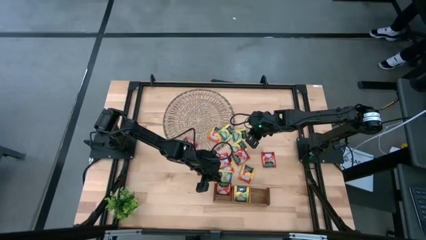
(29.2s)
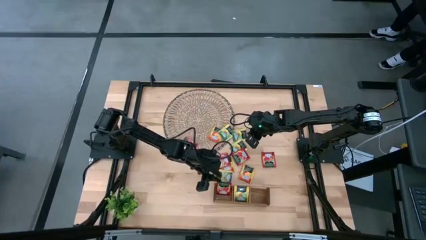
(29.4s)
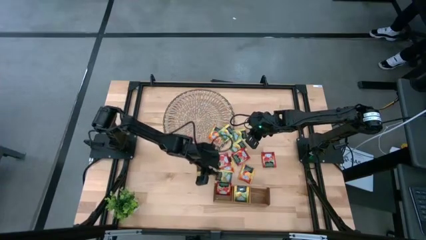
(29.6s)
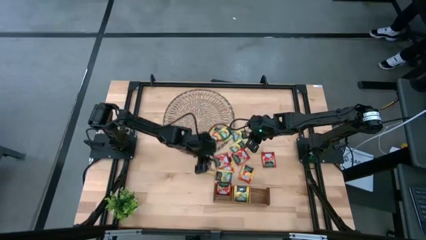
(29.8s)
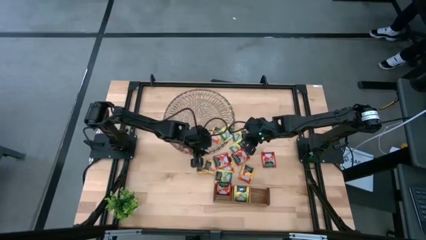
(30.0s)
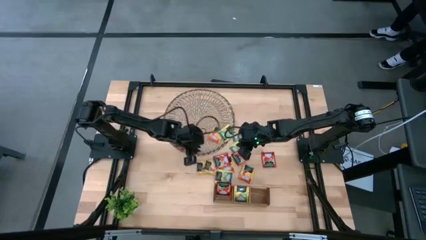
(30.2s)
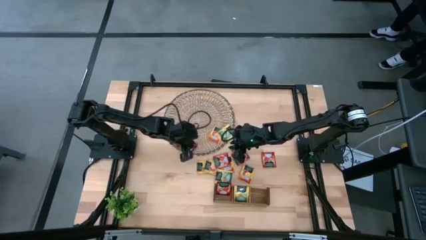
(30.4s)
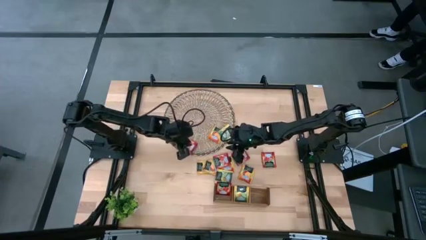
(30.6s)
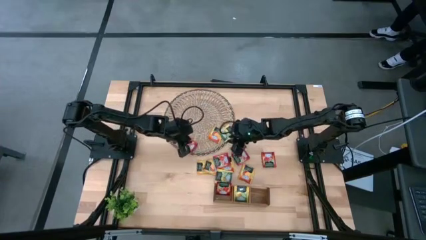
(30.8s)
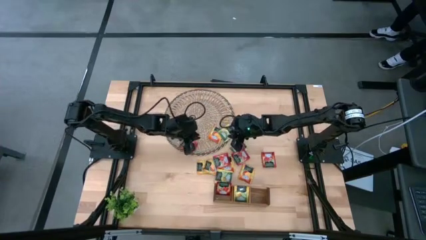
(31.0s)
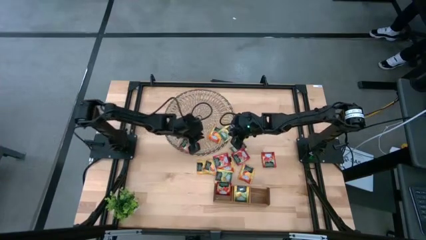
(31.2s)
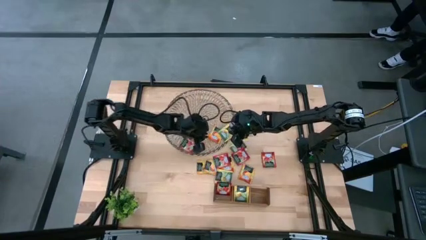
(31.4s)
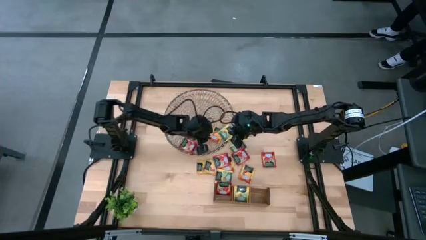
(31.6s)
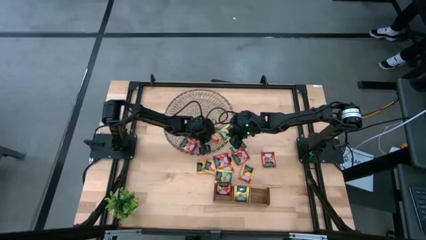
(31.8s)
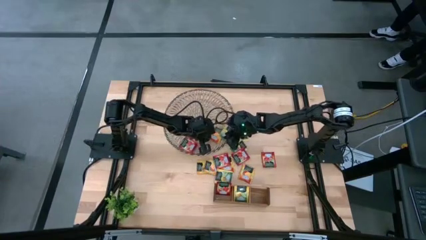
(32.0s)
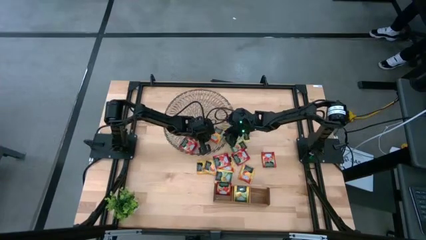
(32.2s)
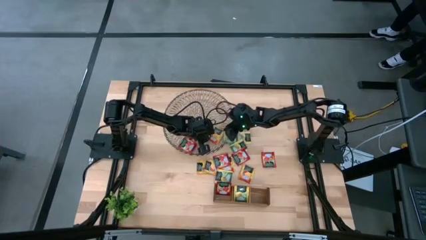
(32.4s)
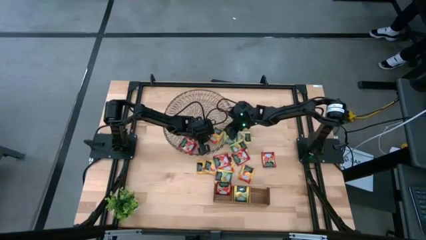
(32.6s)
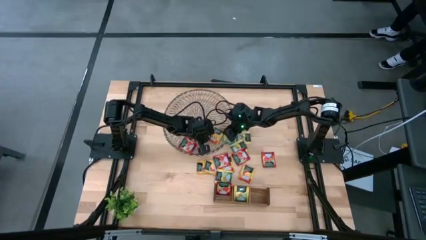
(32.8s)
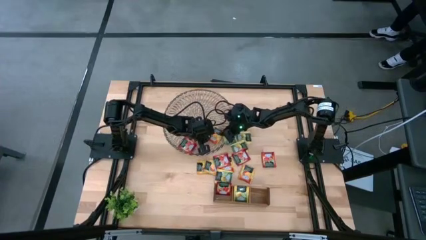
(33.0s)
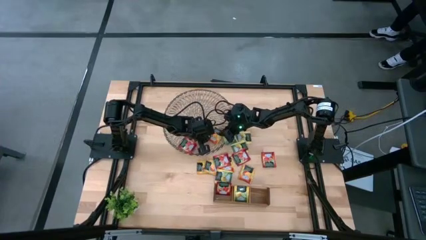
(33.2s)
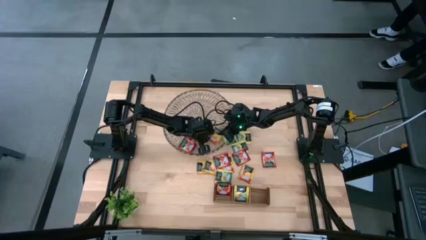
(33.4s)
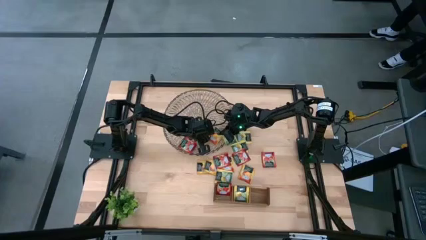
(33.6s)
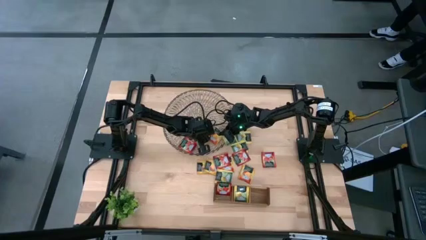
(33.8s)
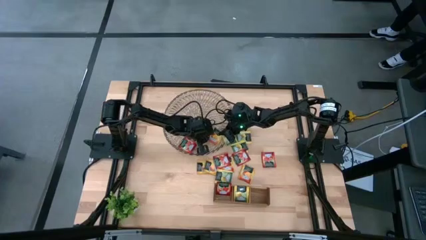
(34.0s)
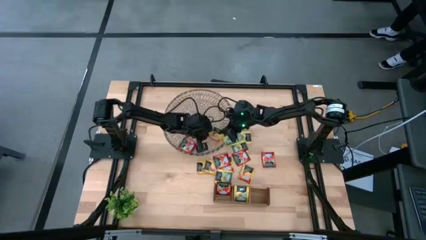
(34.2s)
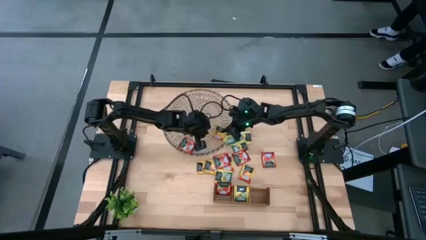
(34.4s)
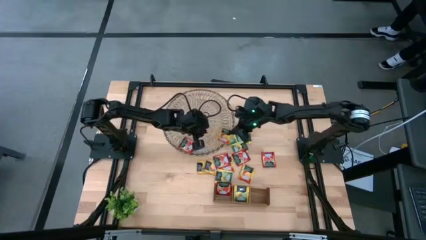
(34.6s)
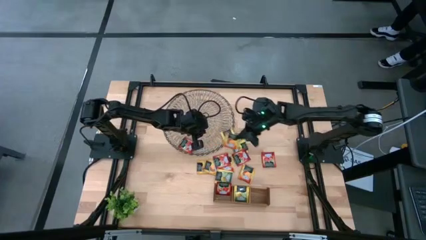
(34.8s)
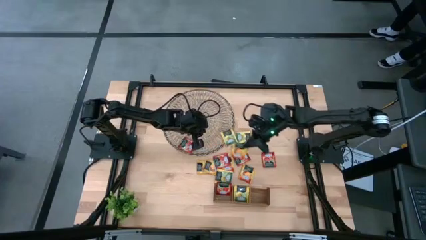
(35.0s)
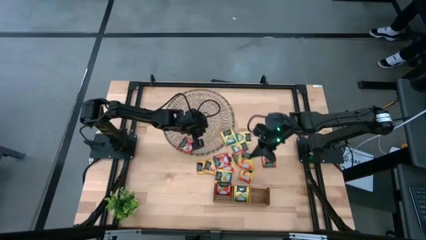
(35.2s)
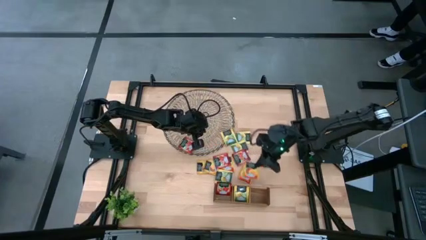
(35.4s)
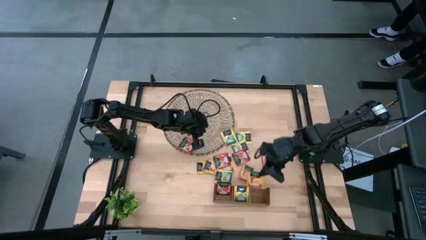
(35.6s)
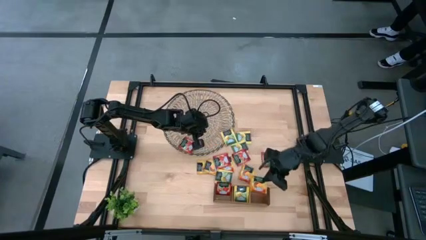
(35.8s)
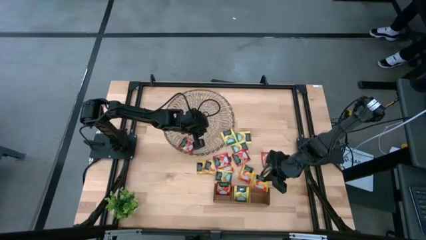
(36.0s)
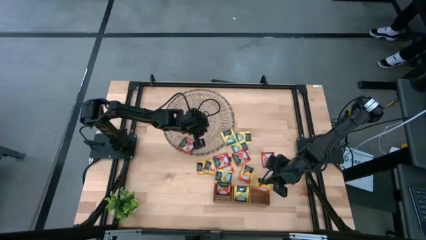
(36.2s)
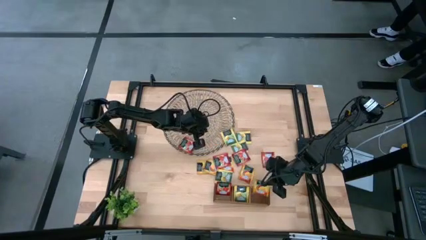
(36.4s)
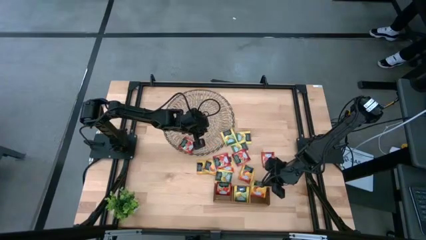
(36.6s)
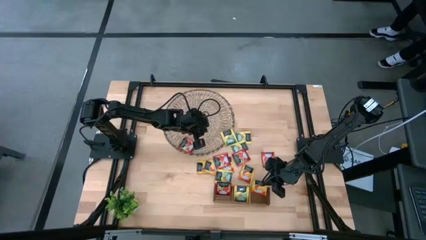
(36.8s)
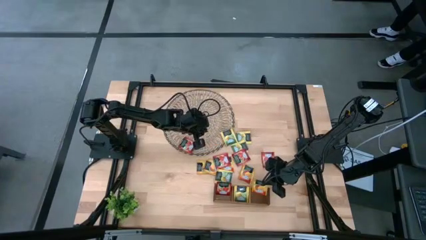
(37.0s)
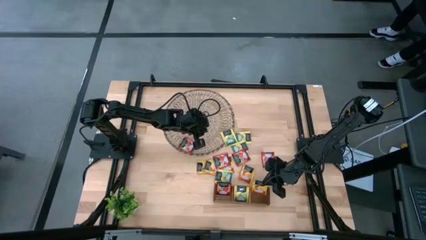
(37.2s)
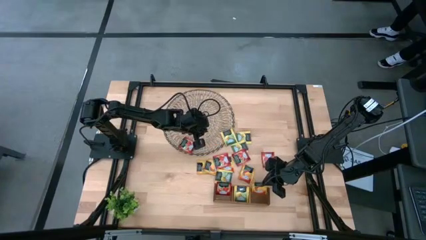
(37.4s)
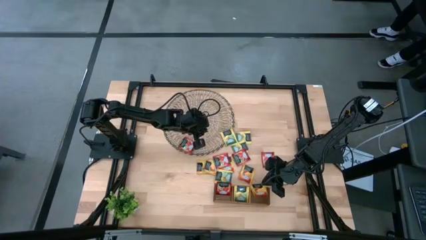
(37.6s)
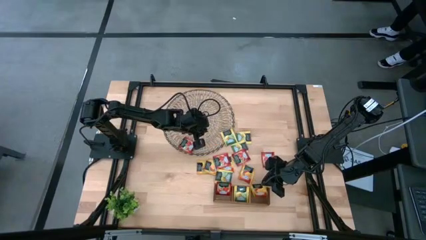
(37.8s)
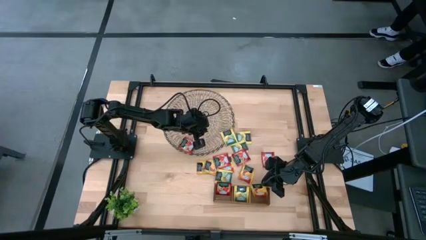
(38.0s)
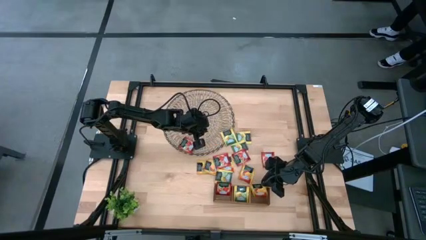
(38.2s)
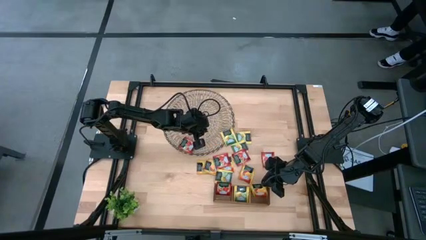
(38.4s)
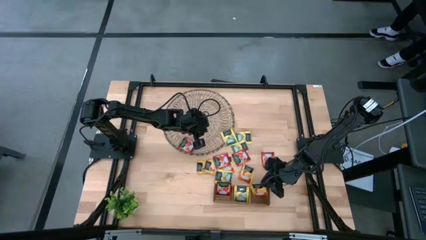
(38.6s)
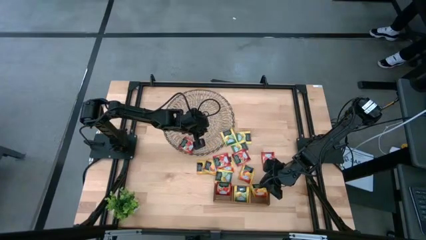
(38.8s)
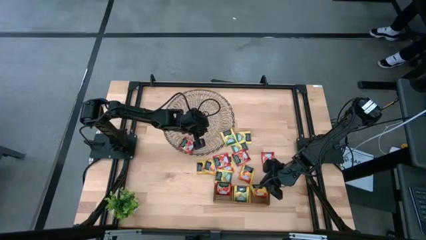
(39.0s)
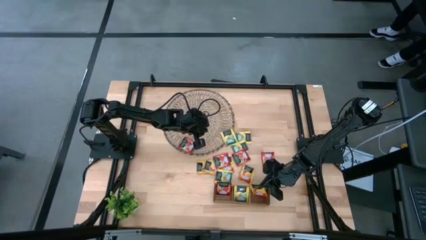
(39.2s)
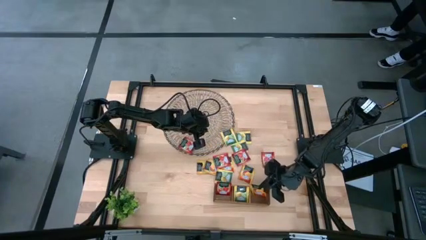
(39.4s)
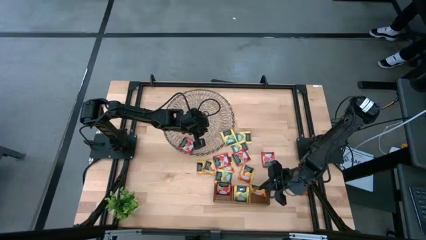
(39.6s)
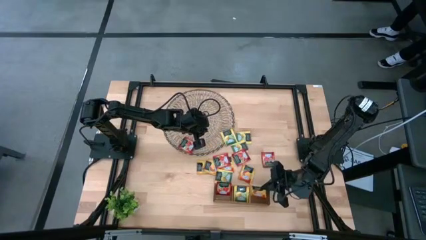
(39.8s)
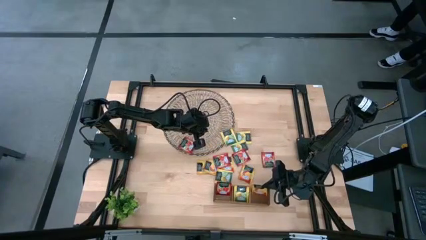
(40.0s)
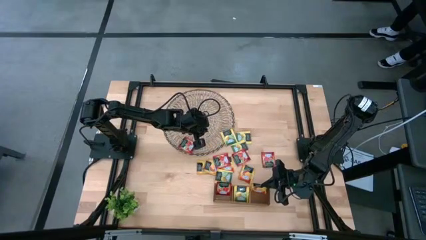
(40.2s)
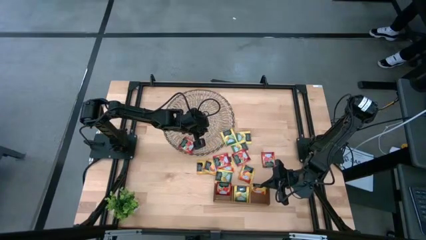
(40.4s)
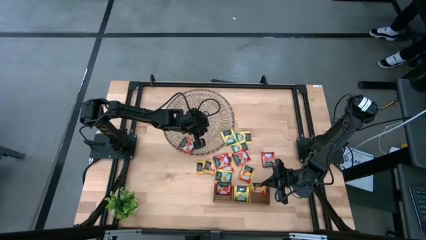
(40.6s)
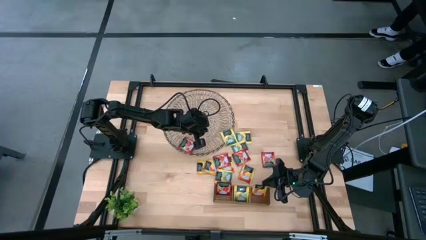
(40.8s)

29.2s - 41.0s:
Task: Pick & Place Tea
Put the orange tea bag into the right section of the wooden organizer

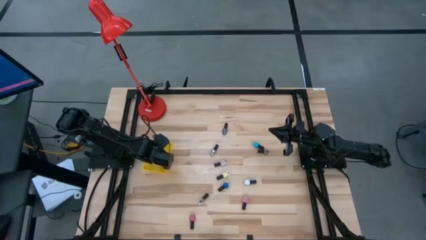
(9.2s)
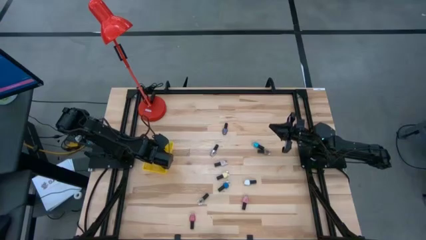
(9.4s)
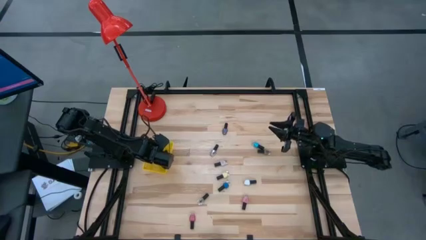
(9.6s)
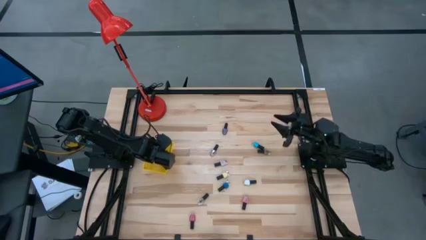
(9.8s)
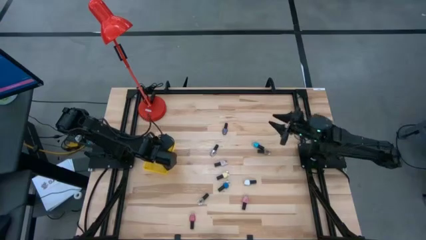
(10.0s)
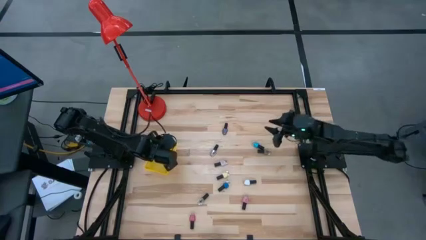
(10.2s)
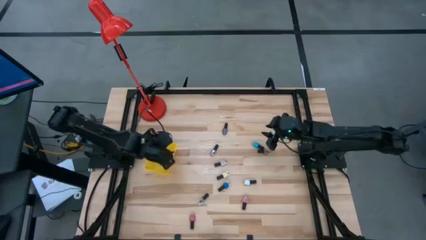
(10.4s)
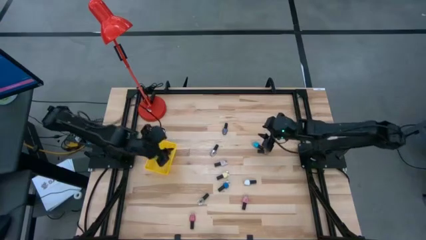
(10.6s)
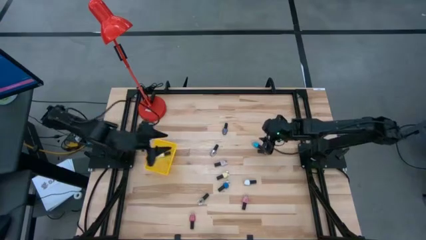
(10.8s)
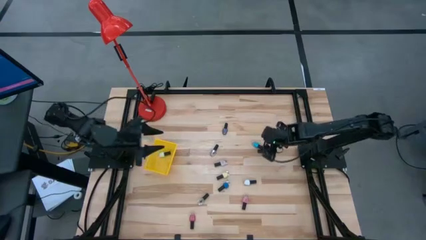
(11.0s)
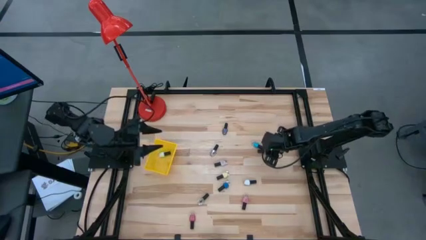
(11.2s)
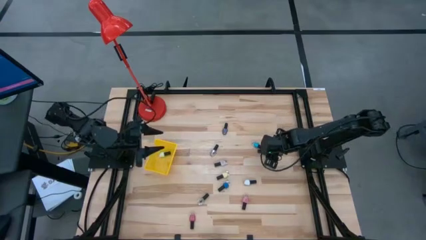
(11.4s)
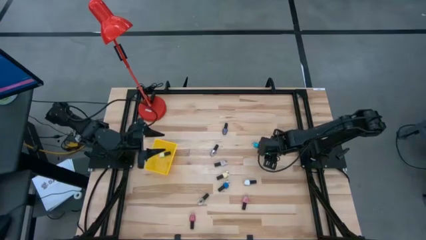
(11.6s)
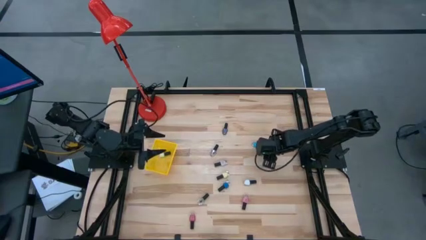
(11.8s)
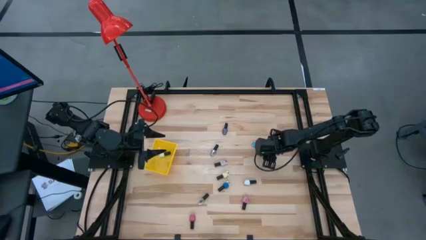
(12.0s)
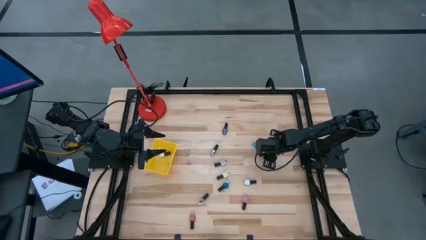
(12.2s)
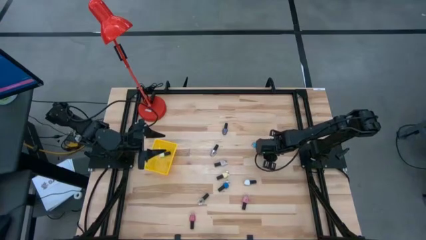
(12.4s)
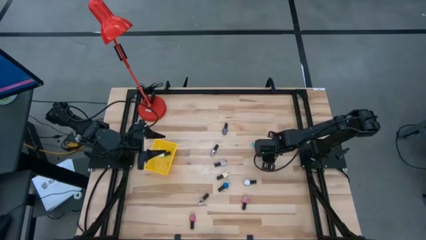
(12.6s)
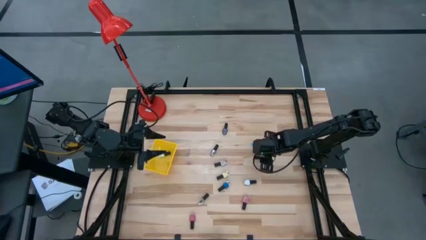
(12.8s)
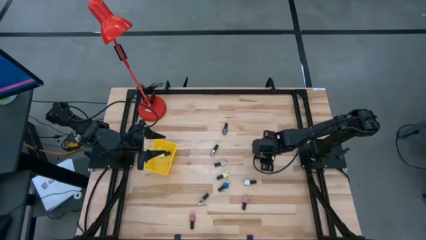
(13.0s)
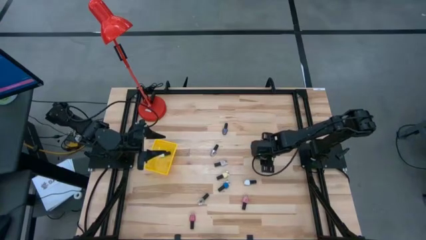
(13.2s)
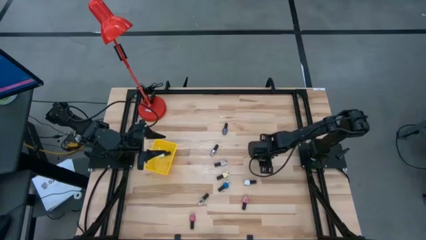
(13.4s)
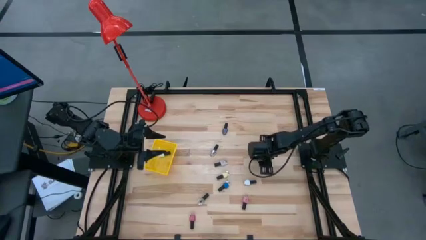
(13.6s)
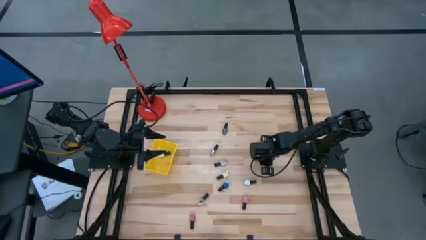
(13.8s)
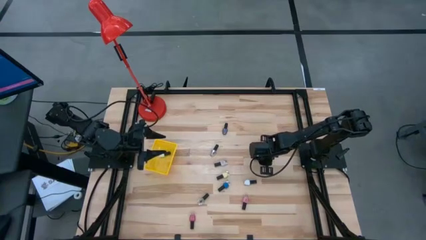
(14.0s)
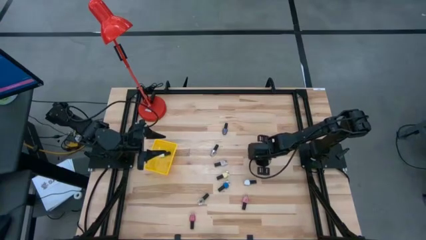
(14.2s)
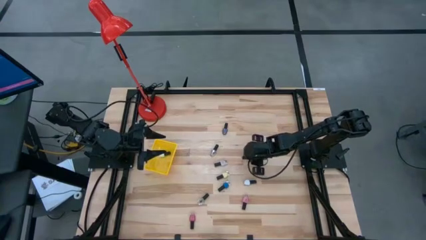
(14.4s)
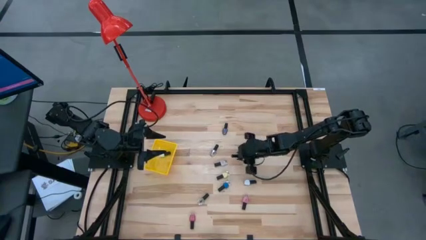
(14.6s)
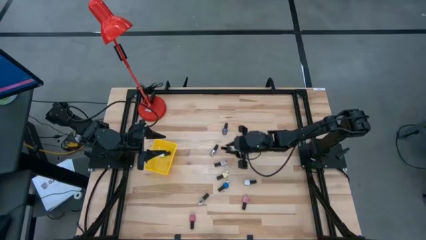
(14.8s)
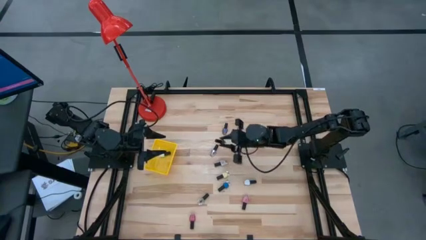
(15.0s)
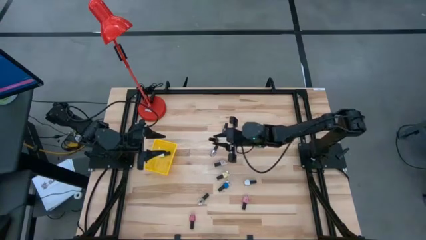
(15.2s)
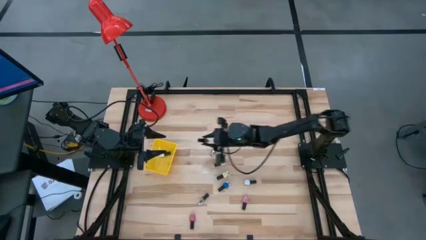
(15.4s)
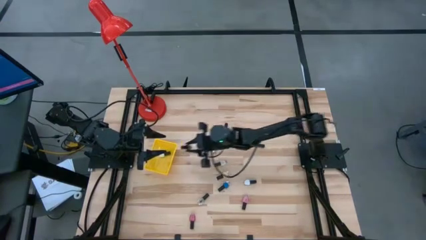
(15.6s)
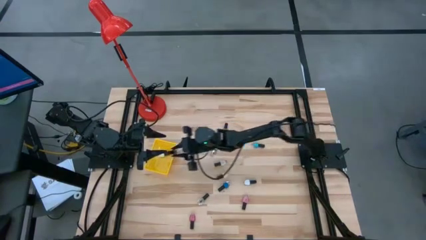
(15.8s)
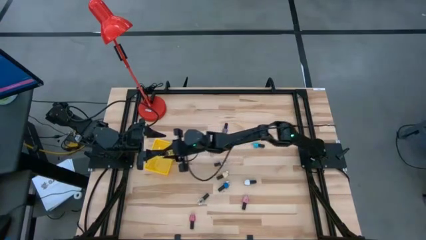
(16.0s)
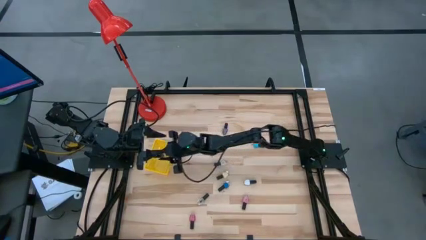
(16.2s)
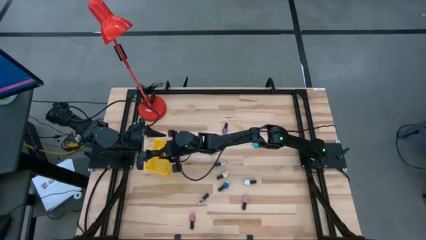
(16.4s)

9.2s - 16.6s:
Task: Pick & Place Nail Polish
Put the brown nail polish bottle into the yellow basket
